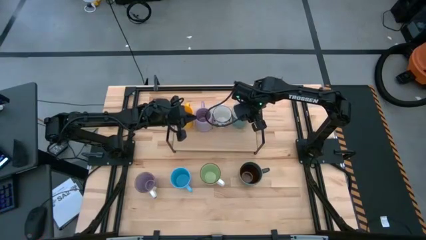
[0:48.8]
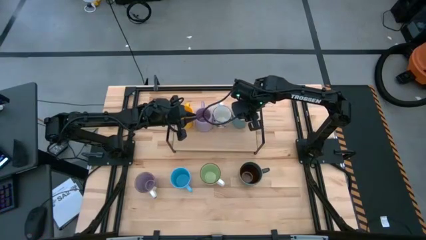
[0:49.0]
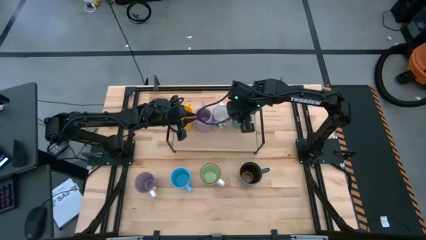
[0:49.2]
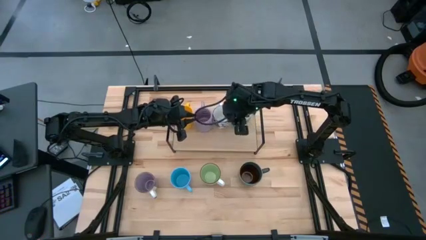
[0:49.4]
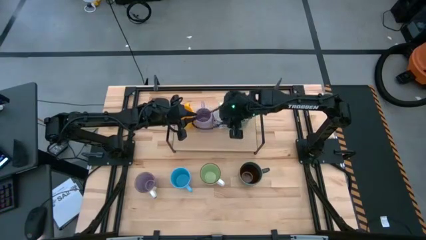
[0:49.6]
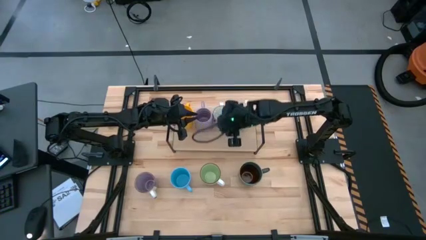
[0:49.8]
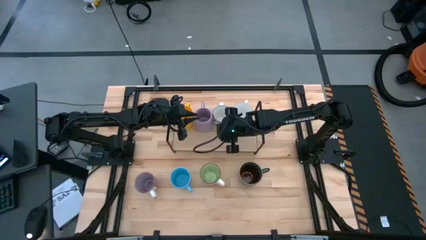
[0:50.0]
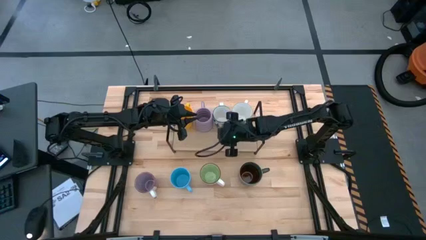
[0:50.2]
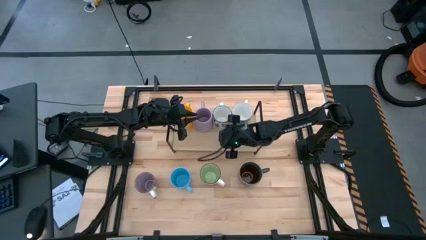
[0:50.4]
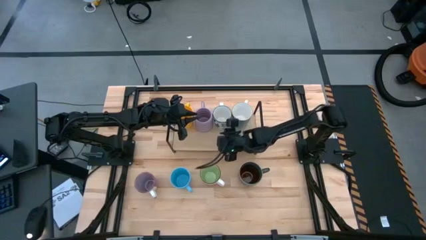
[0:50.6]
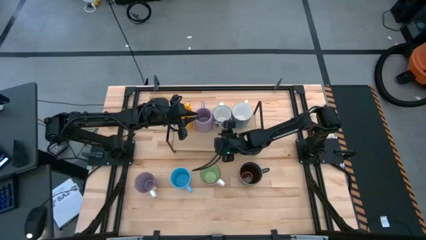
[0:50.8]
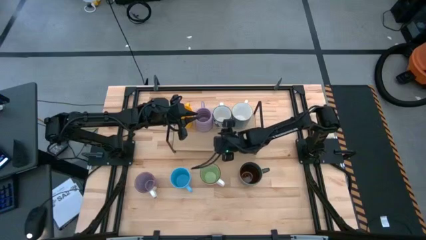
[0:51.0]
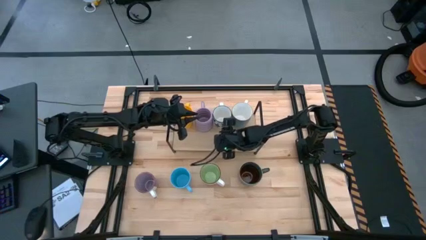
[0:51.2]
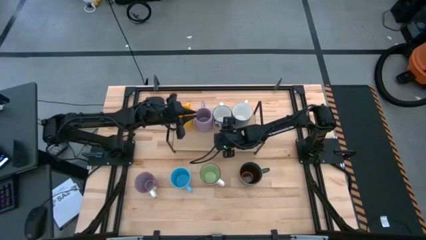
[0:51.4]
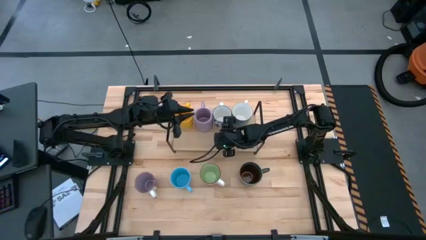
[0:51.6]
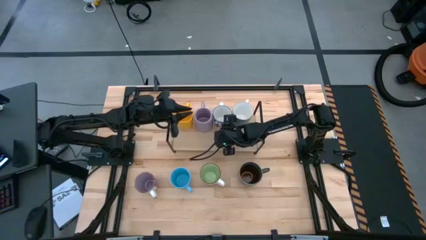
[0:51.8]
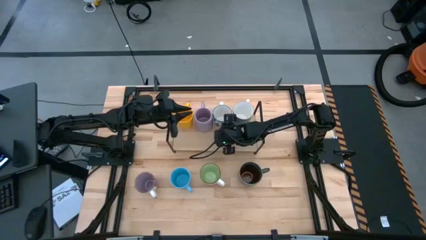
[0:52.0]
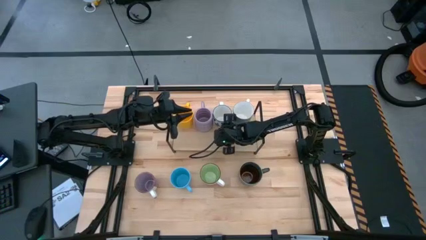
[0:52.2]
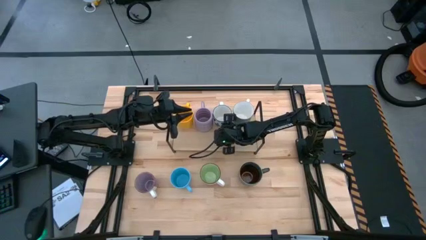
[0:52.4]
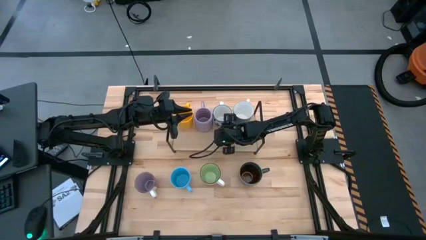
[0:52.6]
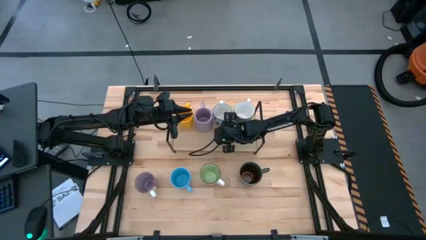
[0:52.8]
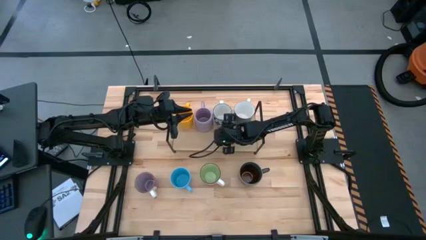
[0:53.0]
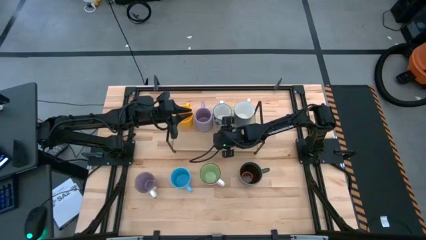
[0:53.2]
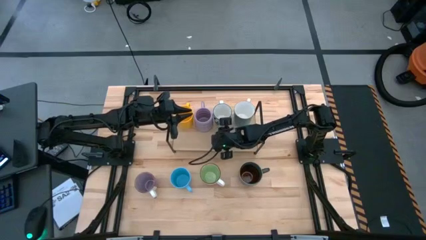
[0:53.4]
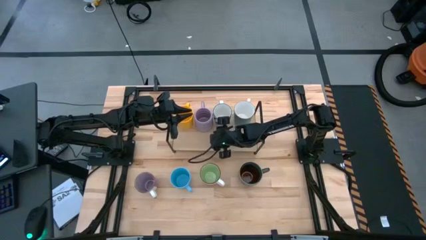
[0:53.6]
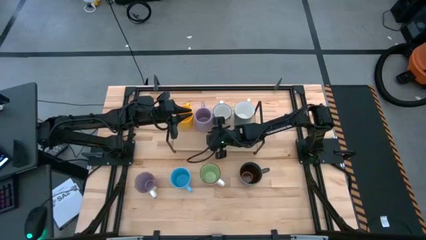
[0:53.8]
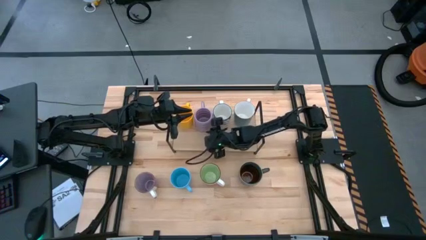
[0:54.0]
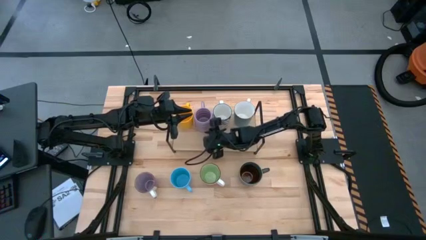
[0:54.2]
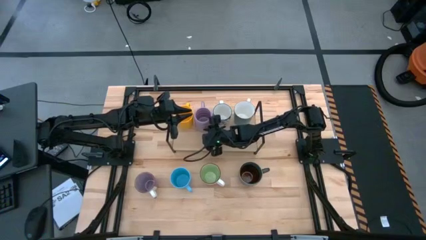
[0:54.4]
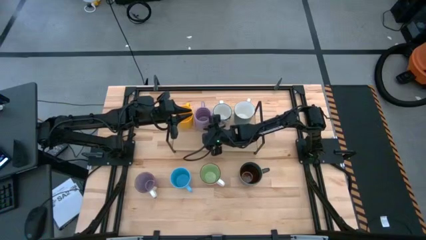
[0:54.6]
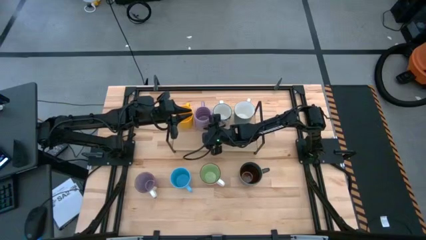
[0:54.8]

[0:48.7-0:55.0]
Task: Place coffee mugs
Adjust the mugs on the shelf

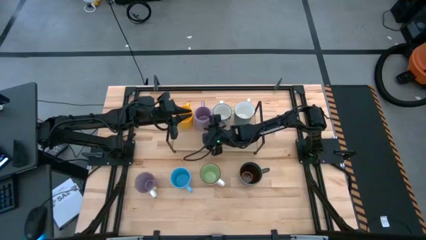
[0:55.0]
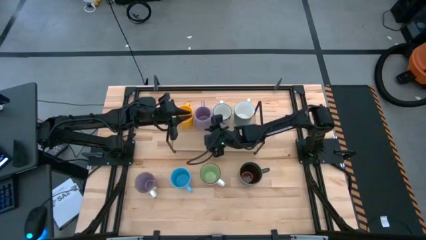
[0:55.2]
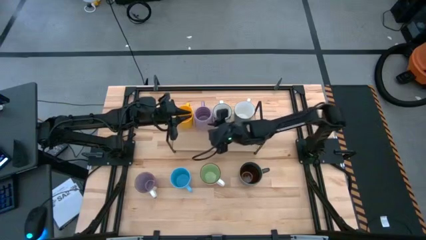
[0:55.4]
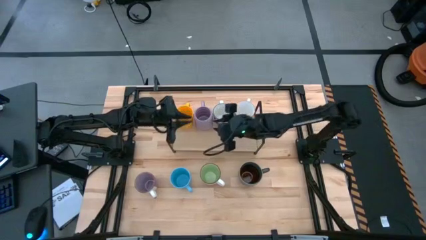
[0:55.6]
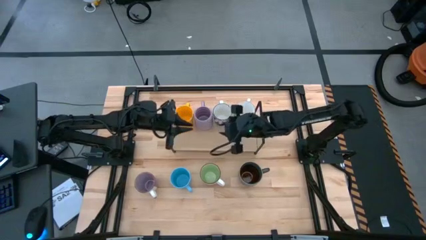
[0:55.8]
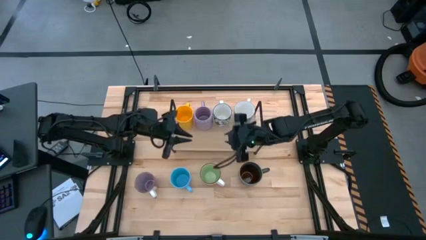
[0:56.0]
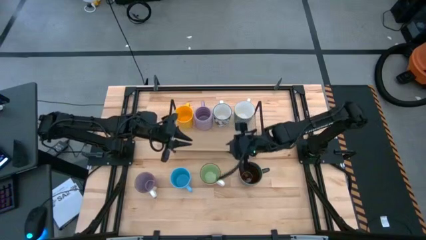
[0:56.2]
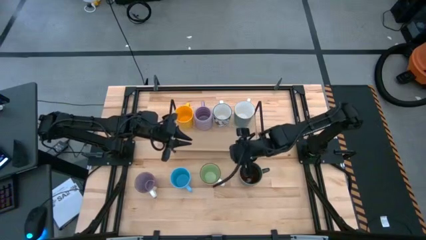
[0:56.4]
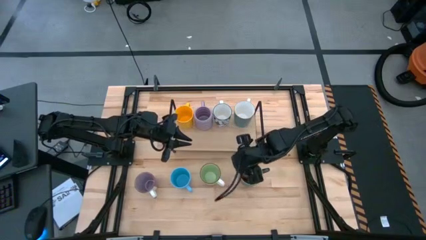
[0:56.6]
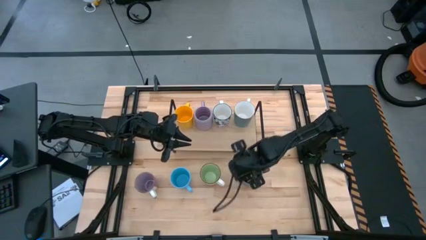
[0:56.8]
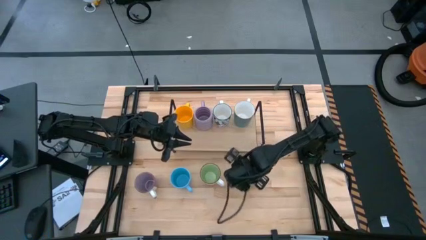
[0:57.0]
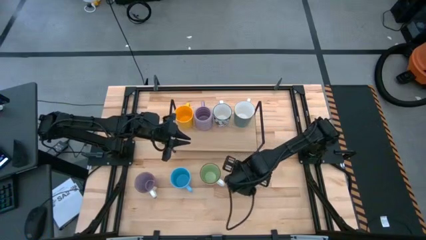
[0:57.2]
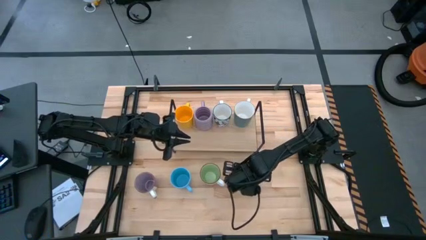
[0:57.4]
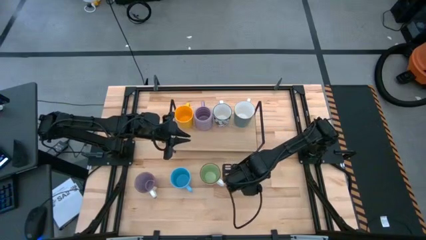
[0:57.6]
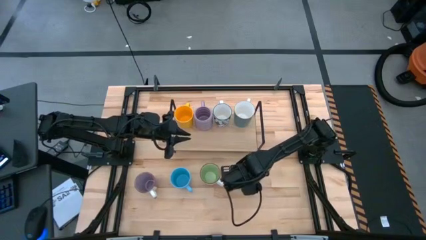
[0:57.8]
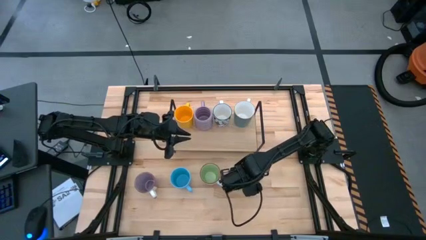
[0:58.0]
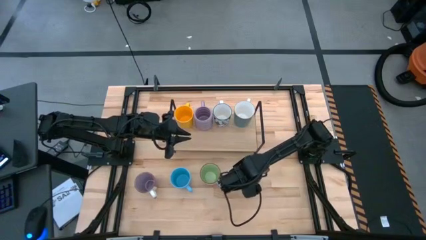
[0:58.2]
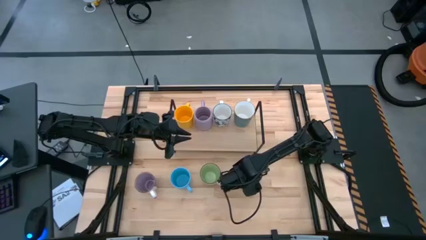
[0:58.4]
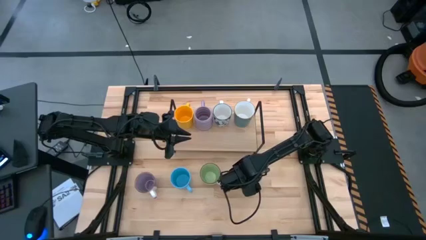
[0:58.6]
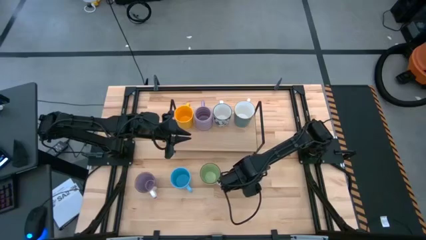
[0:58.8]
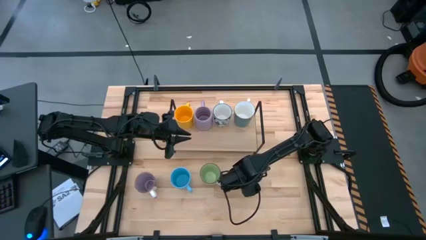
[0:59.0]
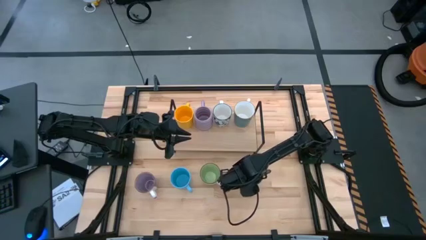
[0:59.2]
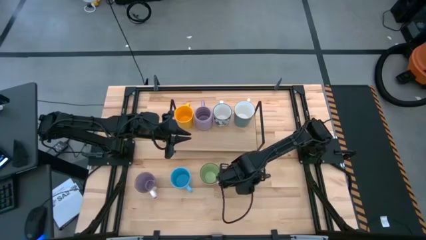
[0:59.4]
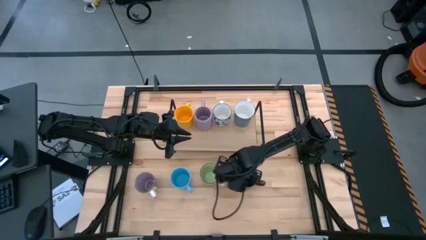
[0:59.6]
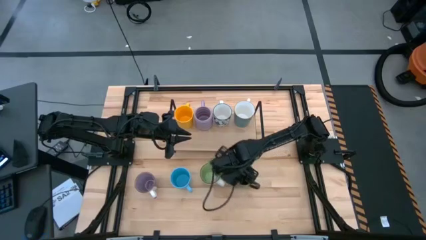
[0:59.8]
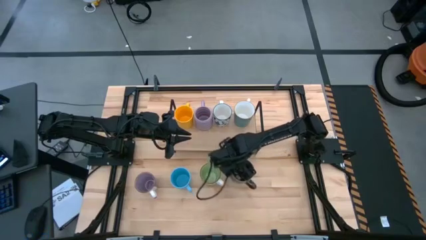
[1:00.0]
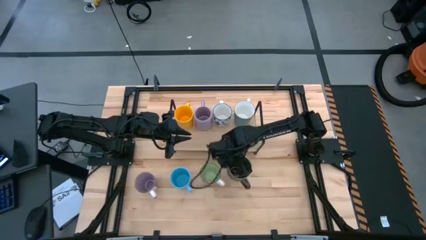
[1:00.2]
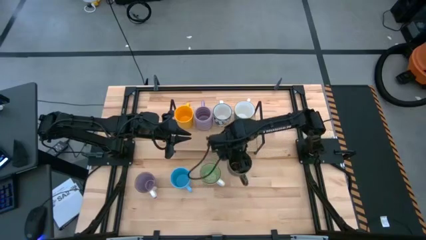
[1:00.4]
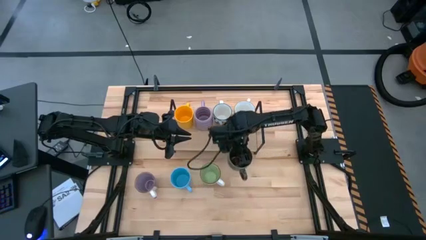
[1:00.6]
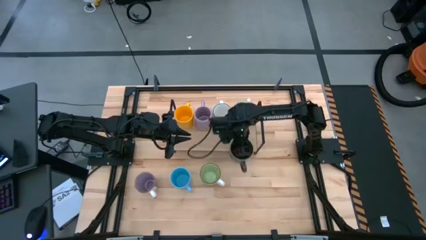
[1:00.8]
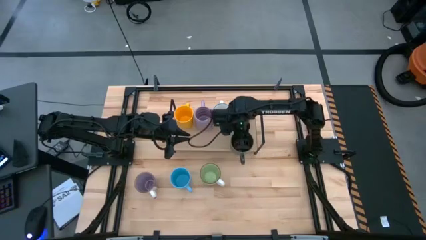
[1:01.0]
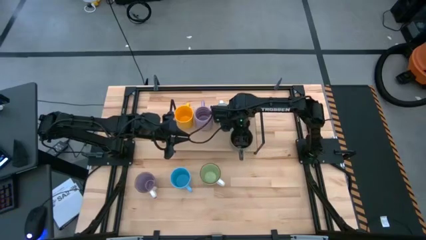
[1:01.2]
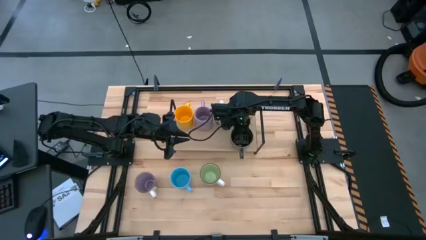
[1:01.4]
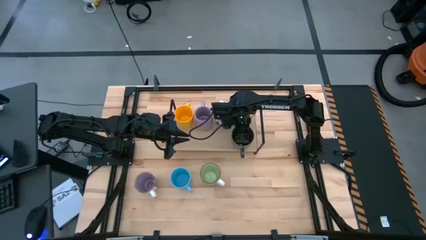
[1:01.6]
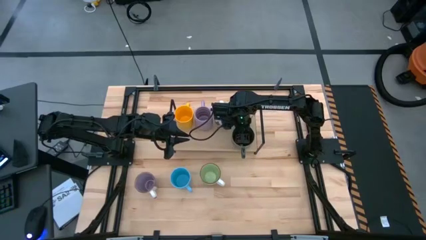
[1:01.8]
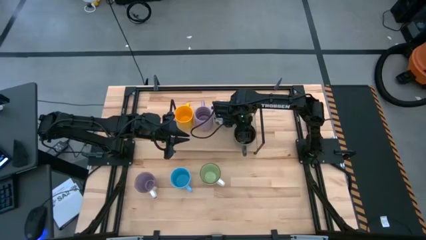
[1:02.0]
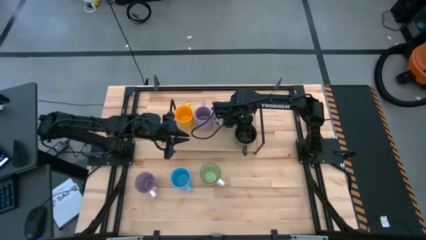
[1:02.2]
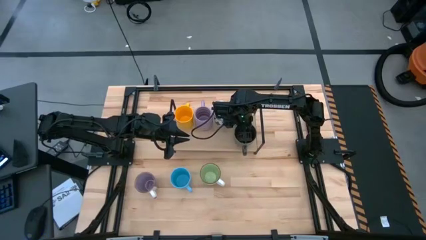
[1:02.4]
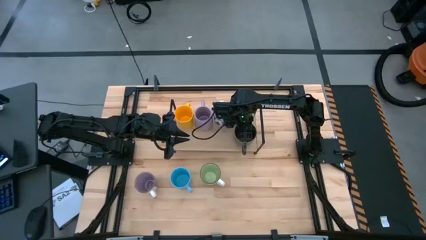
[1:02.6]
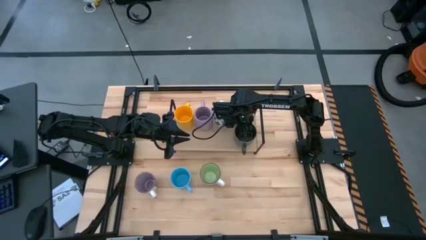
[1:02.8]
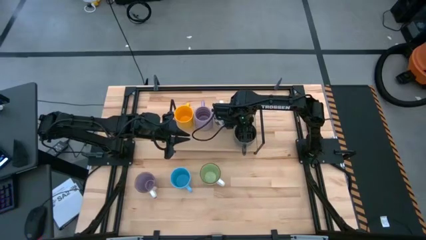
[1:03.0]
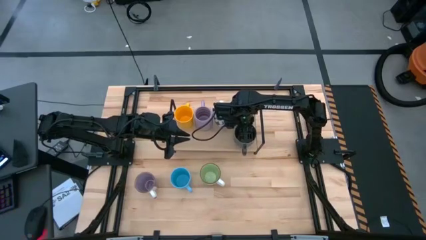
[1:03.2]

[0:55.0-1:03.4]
Put the blue-brown mug on the shelf

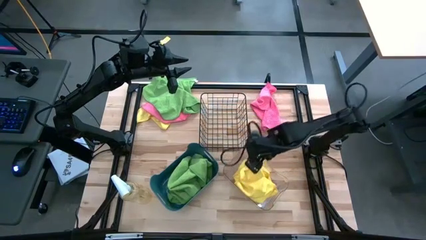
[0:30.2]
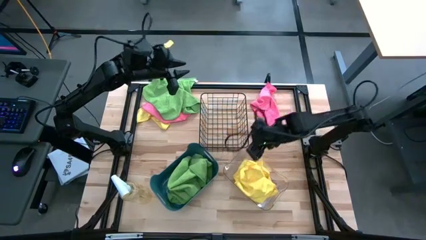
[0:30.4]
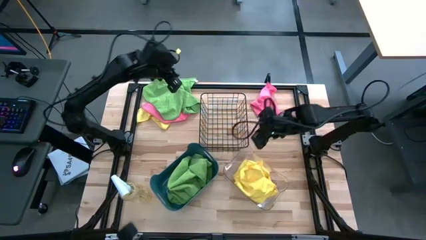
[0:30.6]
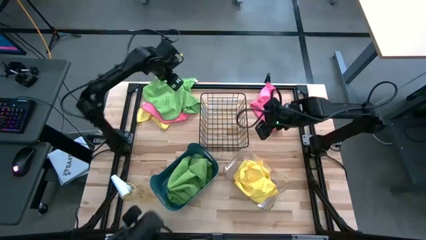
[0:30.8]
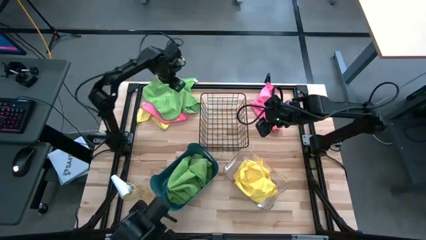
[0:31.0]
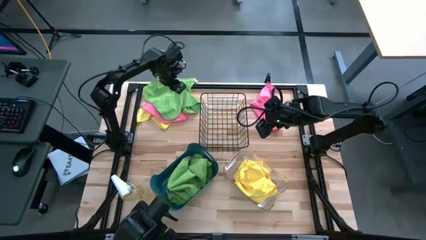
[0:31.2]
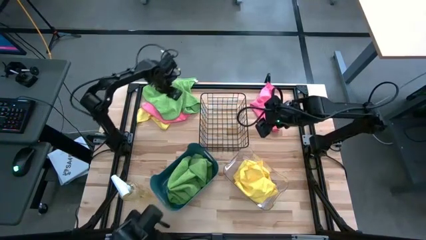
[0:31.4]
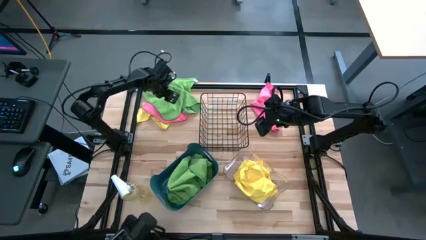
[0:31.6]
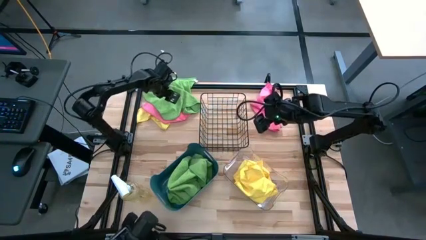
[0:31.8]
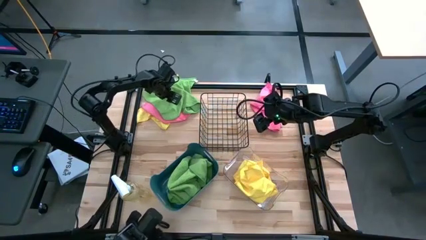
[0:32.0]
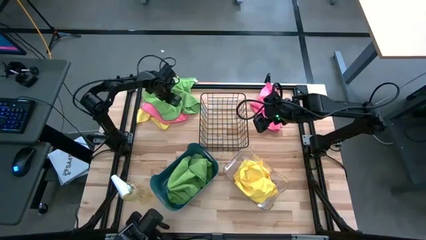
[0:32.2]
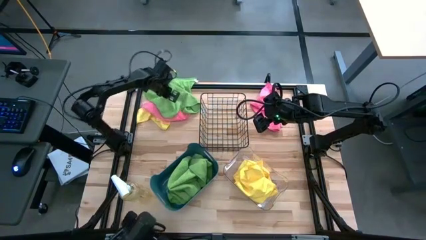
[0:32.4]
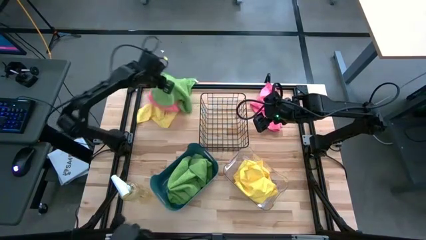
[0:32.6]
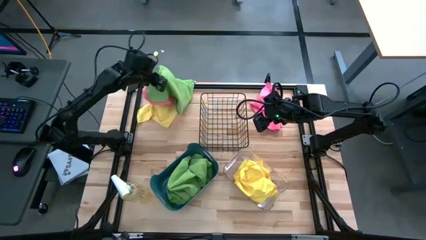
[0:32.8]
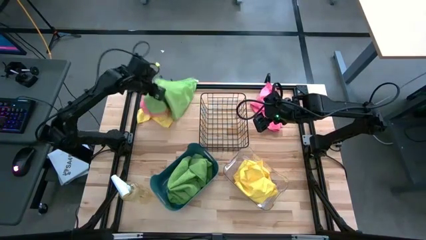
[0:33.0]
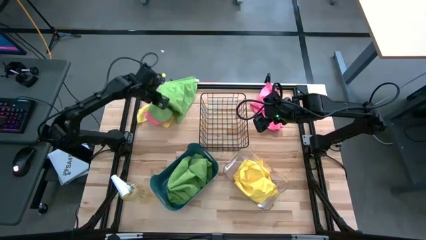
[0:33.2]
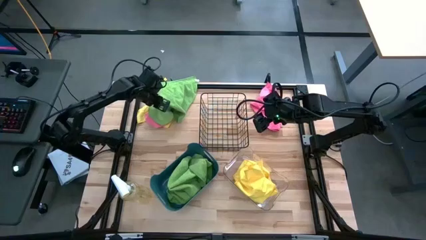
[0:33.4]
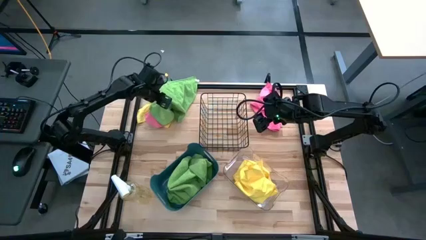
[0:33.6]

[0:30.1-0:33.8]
Task: Sort microfiber towel by color & place in baskets
Put the green towel into the blue bin
